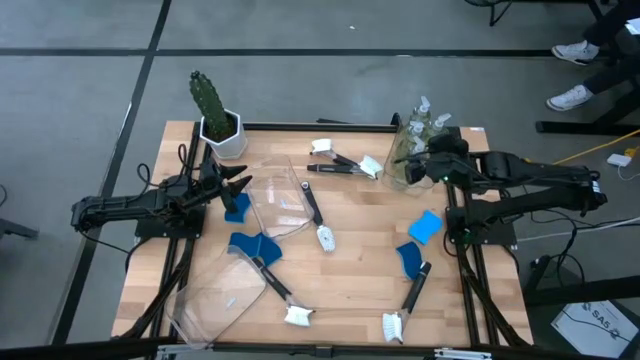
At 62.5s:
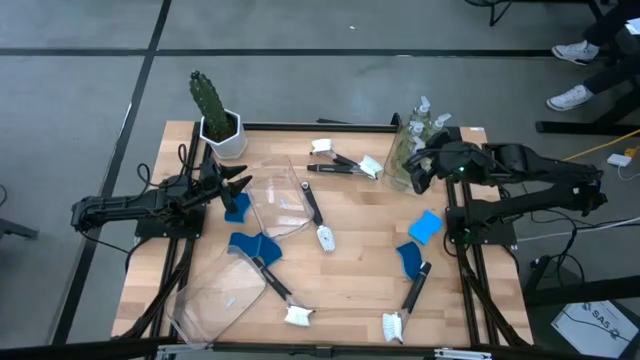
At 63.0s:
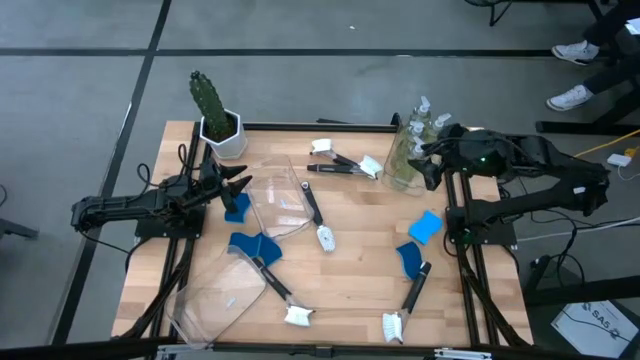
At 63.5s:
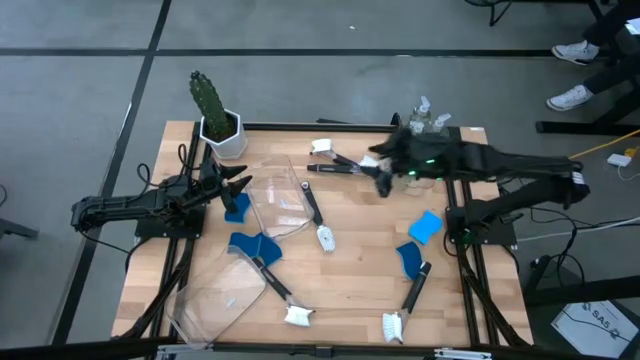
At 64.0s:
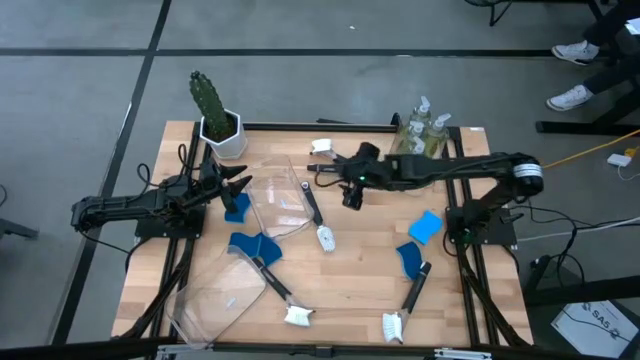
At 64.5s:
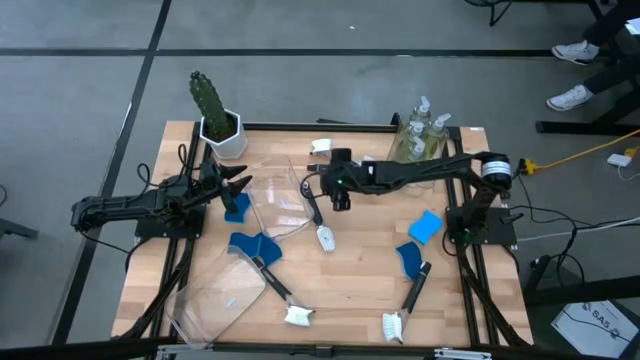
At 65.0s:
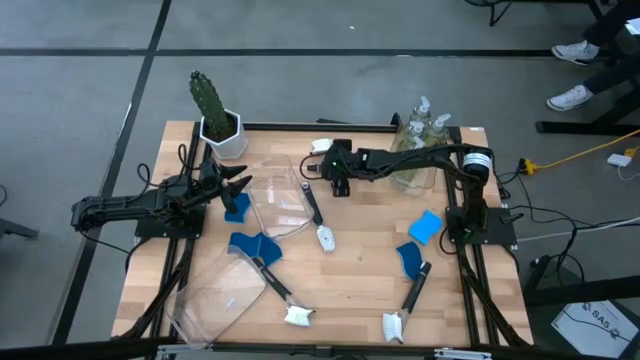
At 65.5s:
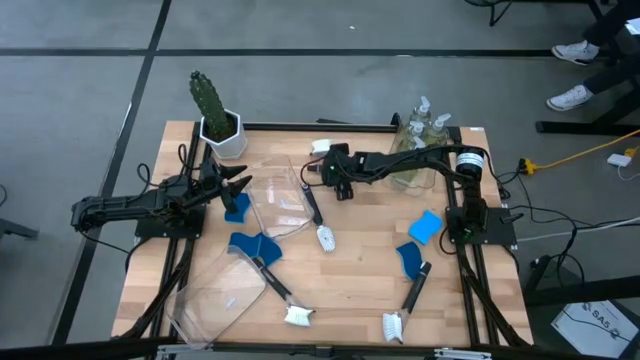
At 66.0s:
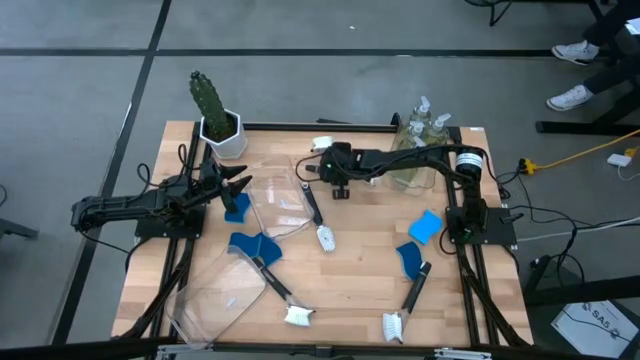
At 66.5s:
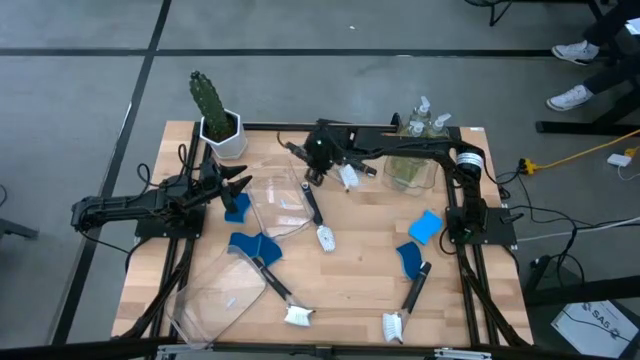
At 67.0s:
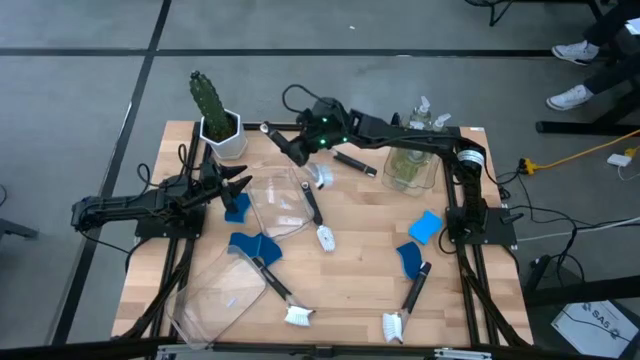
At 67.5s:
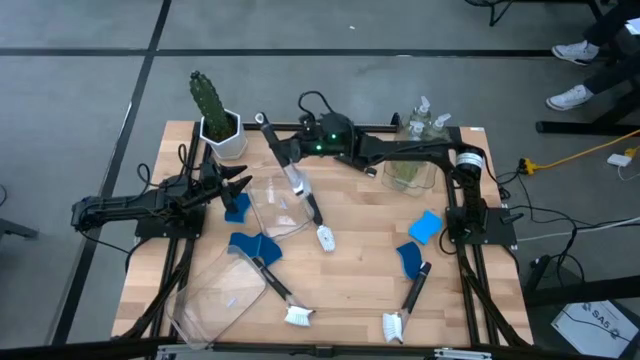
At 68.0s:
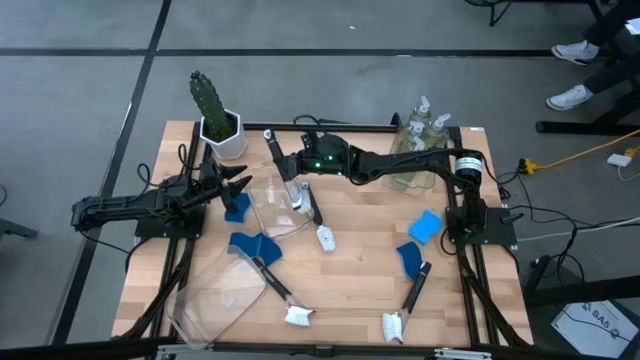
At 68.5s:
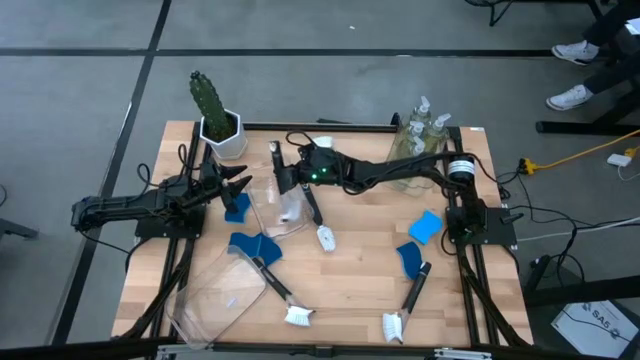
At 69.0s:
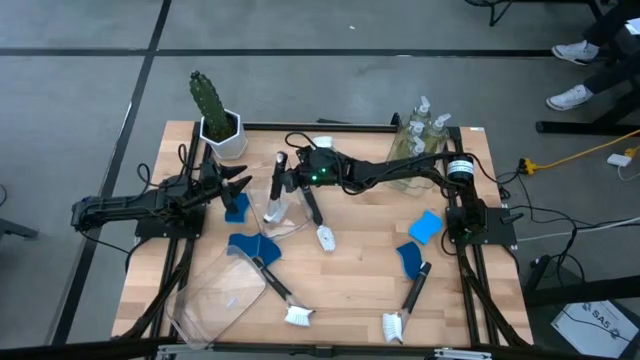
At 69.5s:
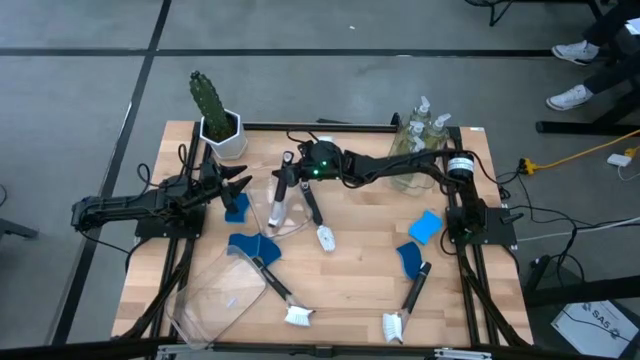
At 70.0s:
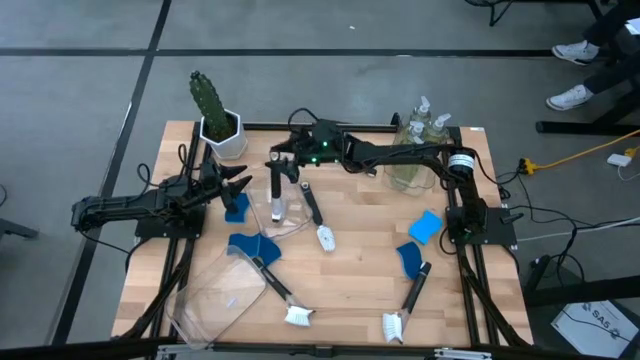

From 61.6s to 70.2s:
Task: Pick & Place Kitchen Sink Supplies
Put the black dish brush into the top left transparent bin

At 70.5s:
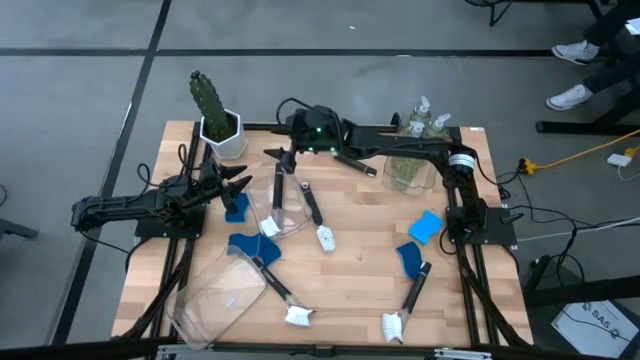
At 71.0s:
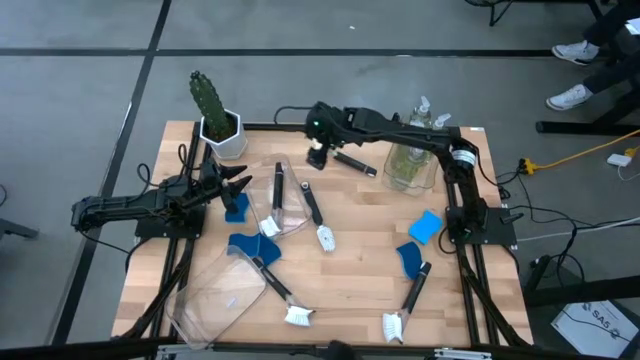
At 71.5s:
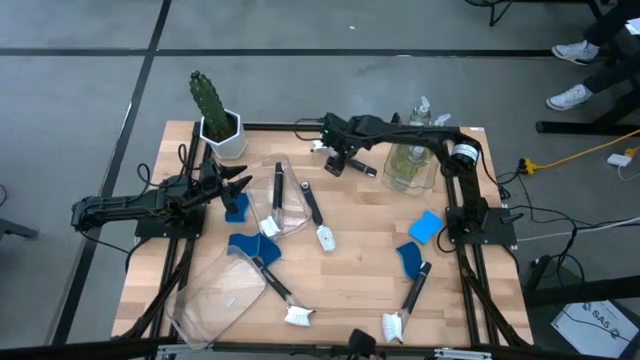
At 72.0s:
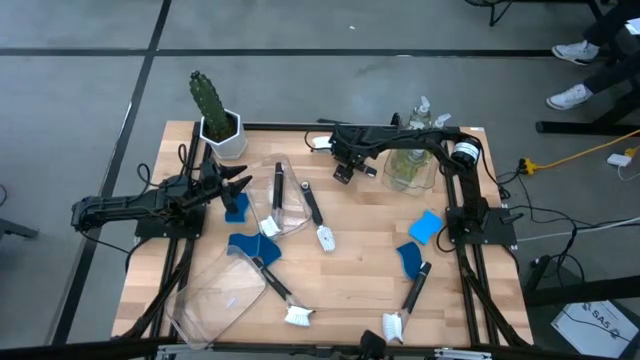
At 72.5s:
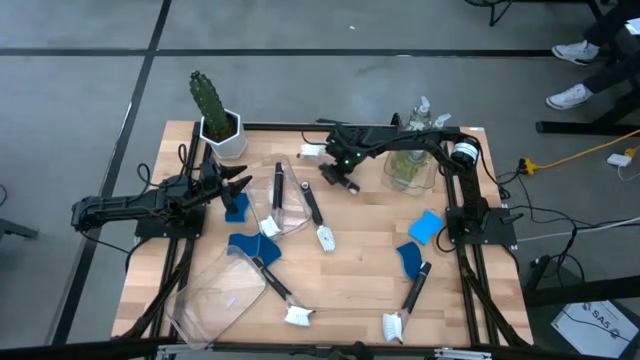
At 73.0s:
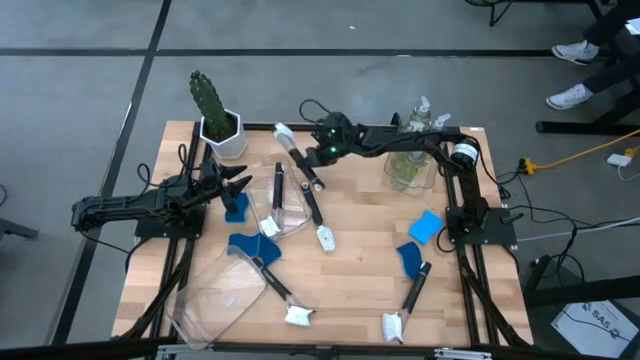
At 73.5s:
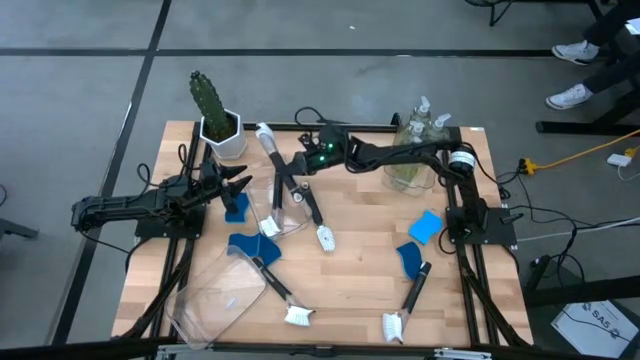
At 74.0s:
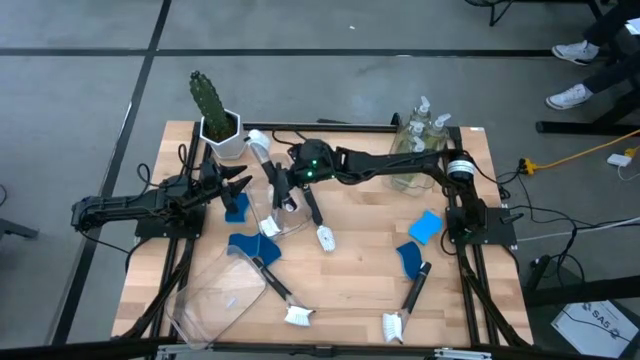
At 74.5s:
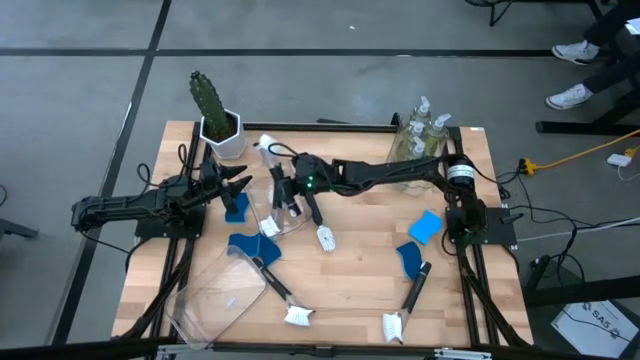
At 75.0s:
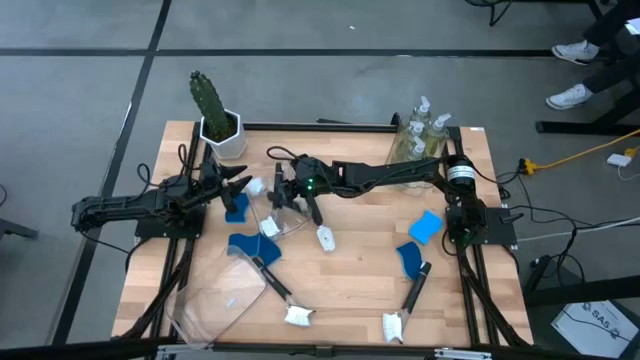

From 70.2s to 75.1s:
Put the black dish brush into the top left transparent bin

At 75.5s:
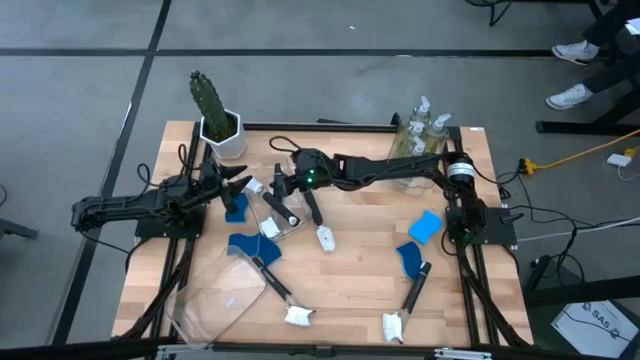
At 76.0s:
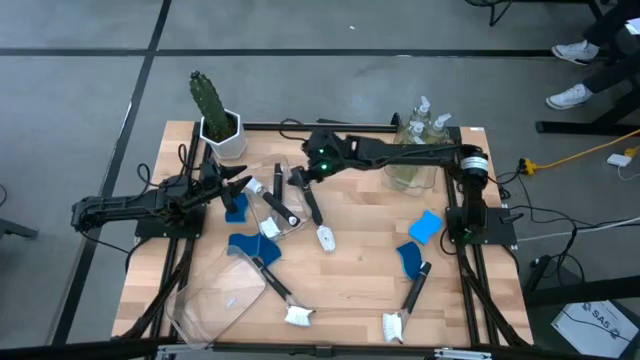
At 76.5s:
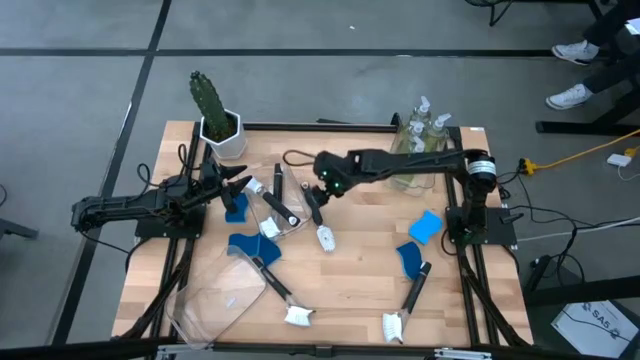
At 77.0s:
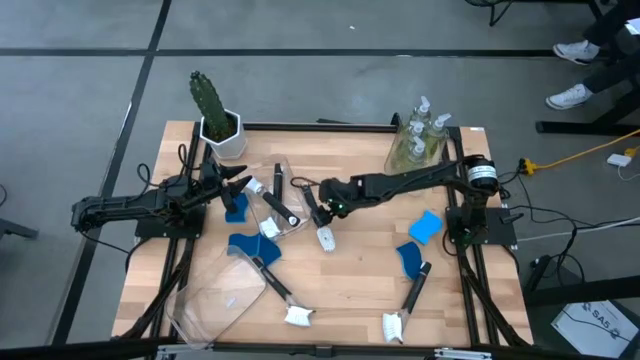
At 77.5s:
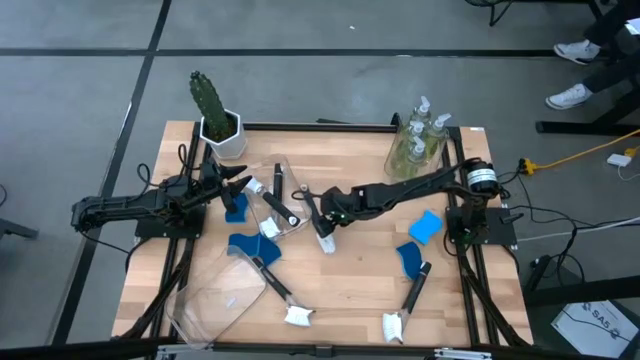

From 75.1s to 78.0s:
Put the black dish brush into the top left transparent bin

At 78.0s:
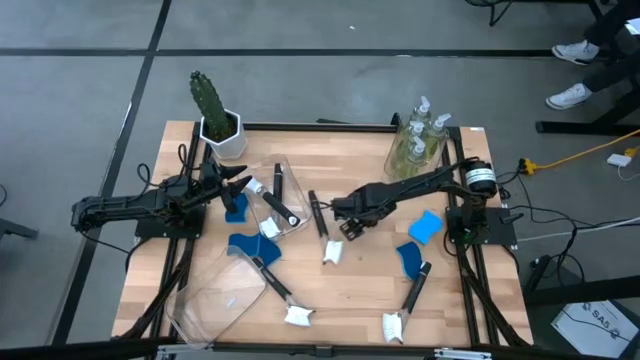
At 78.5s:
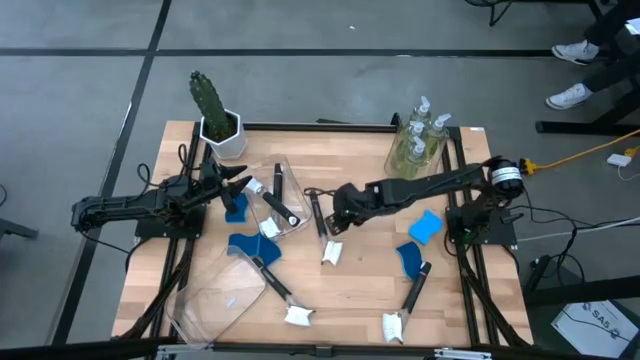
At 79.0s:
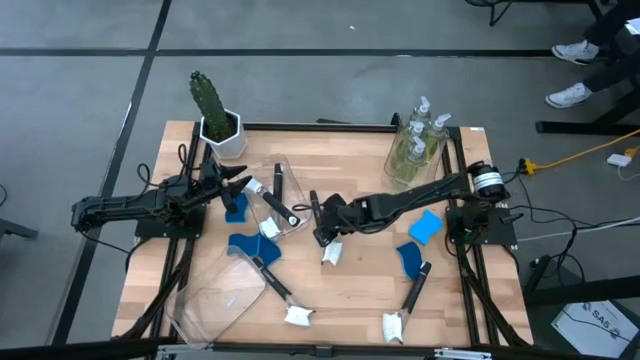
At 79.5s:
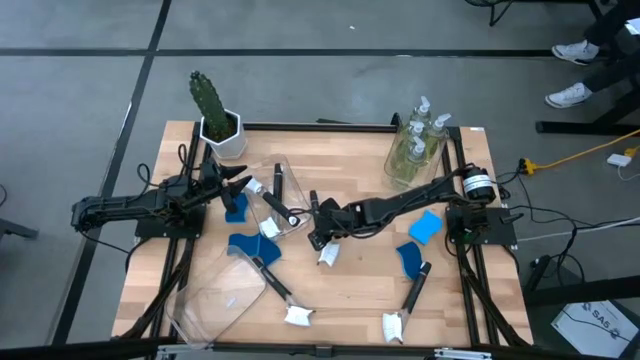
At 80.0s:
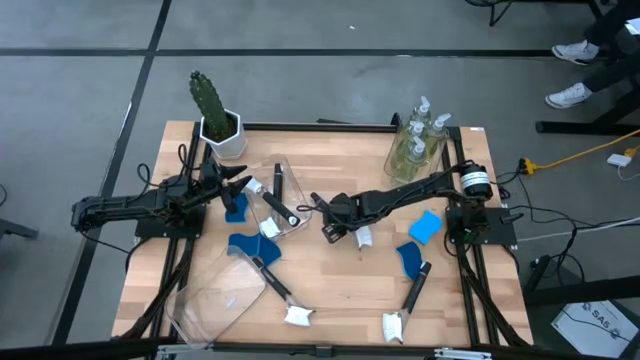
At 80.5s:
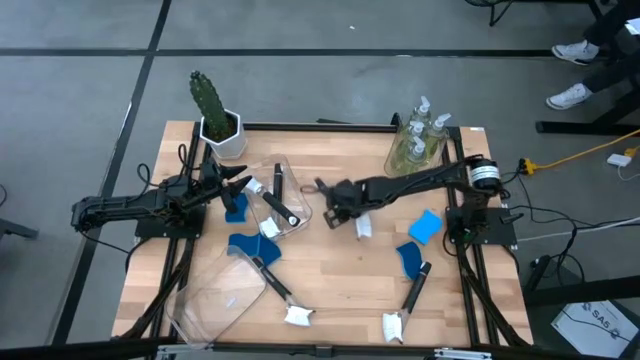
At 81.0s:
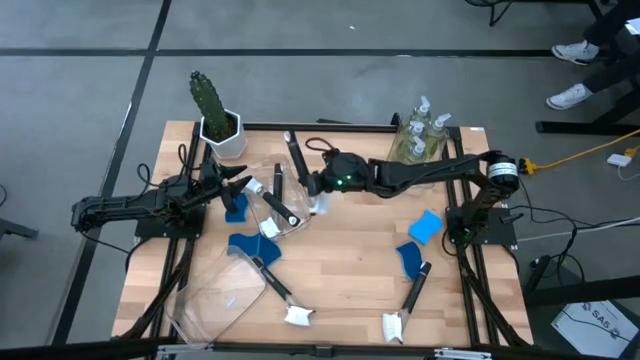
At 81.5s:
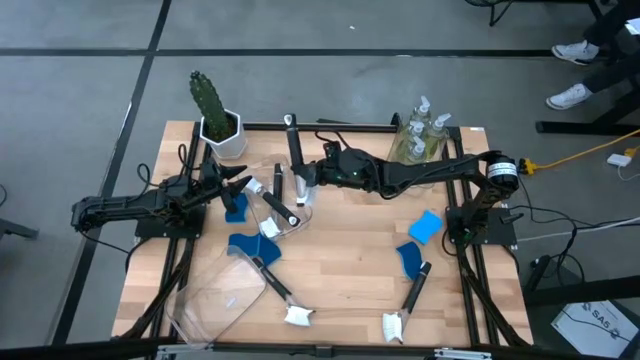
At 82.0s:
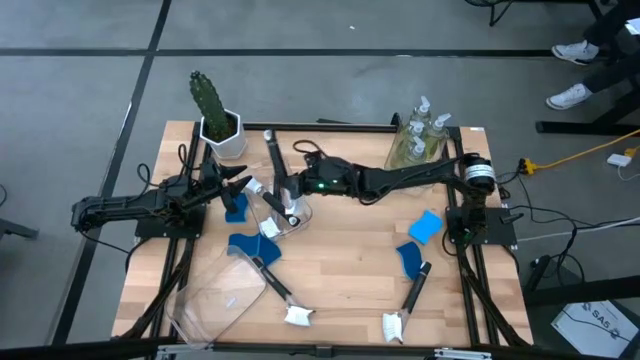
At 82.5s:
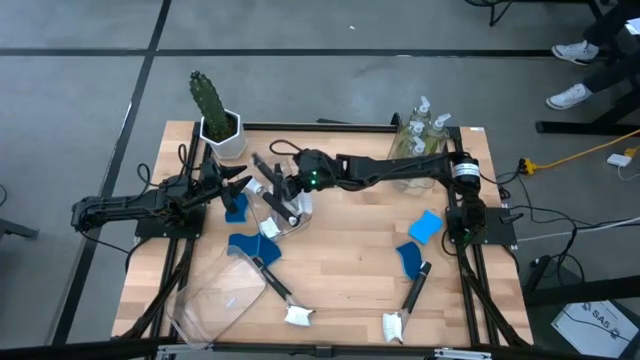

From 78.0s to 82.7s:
Put the black dish brush into the top left transparent bin
